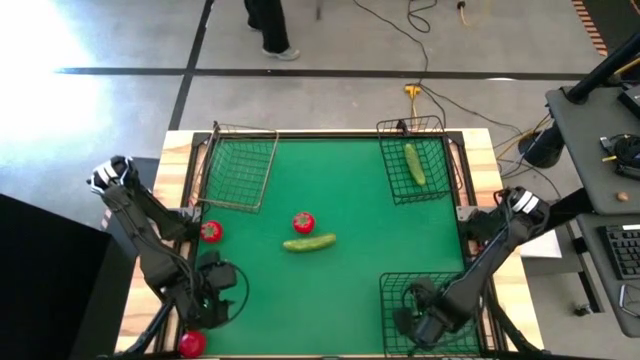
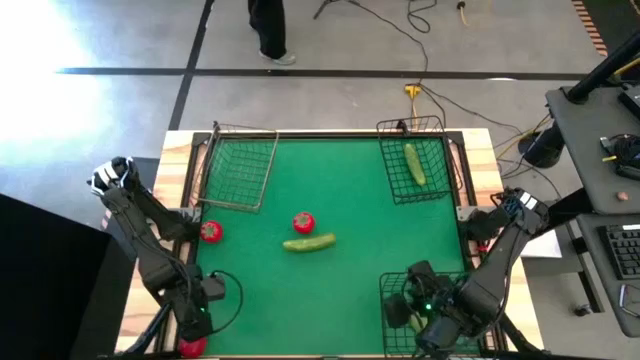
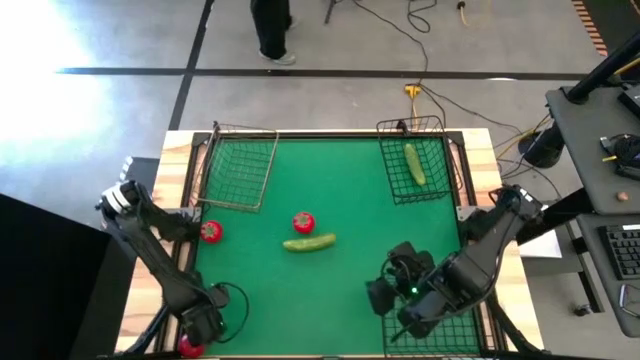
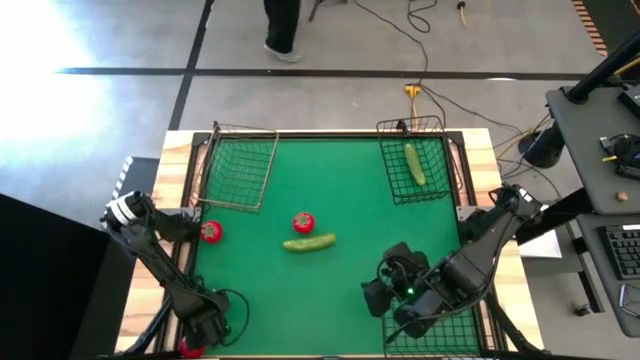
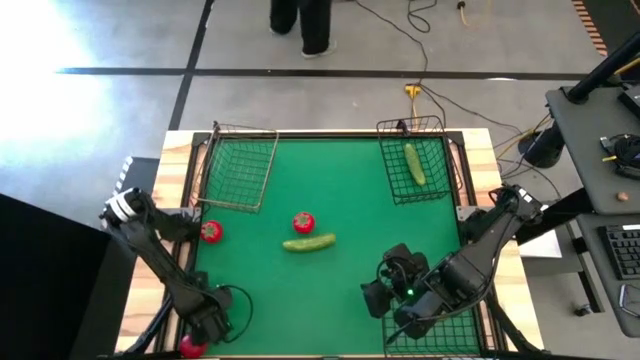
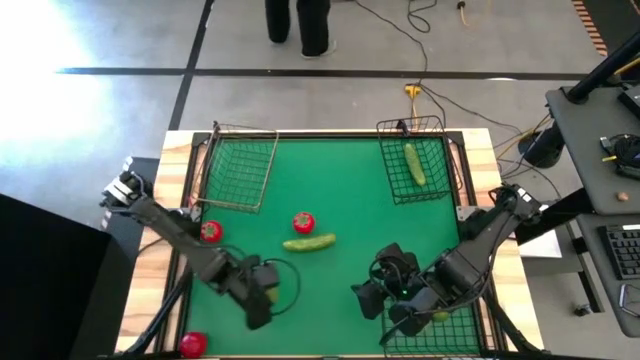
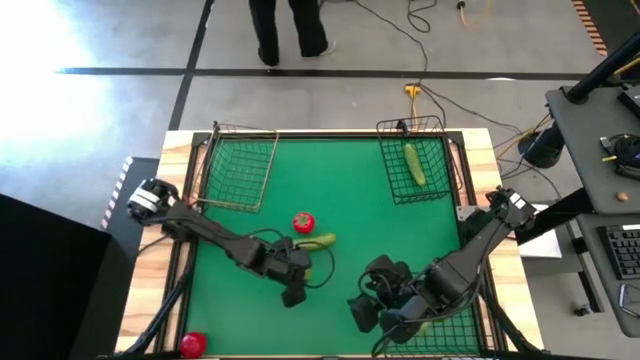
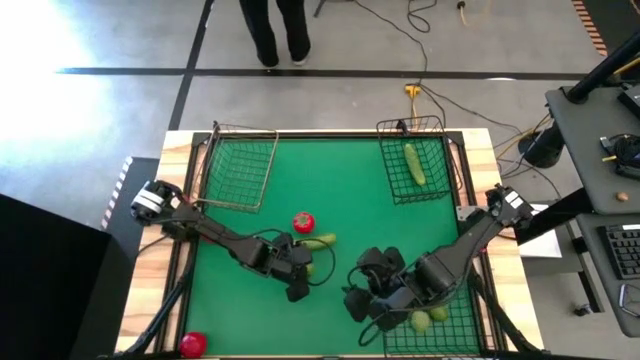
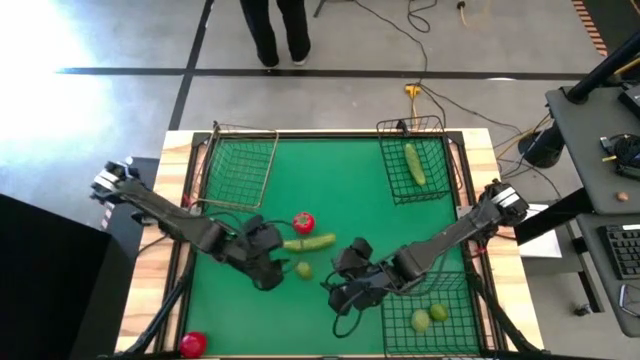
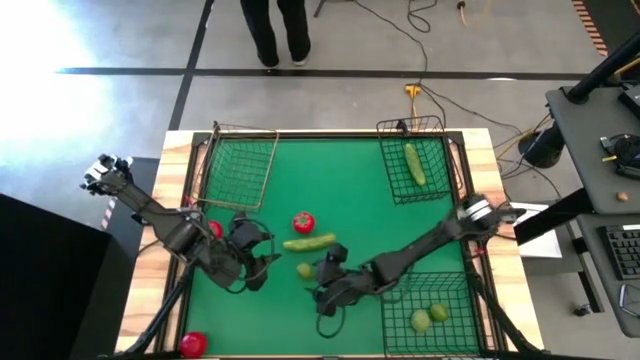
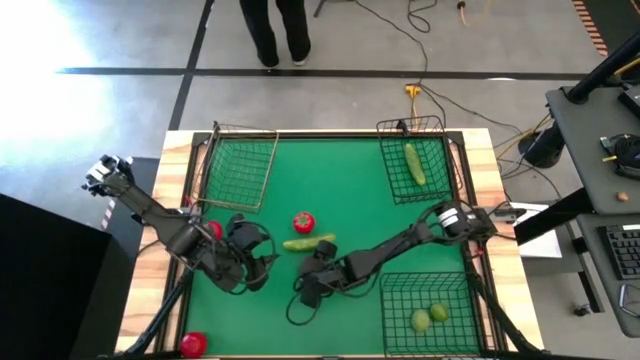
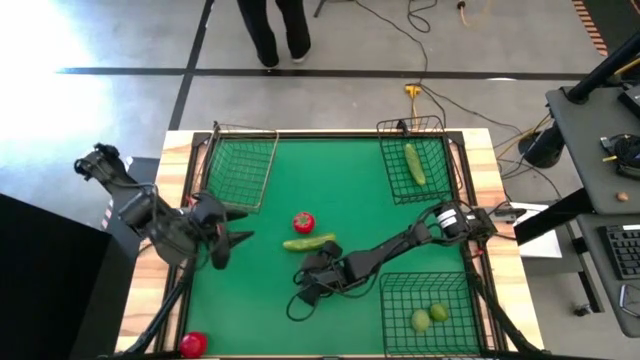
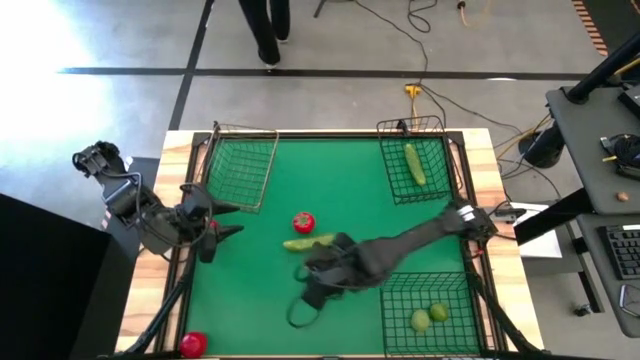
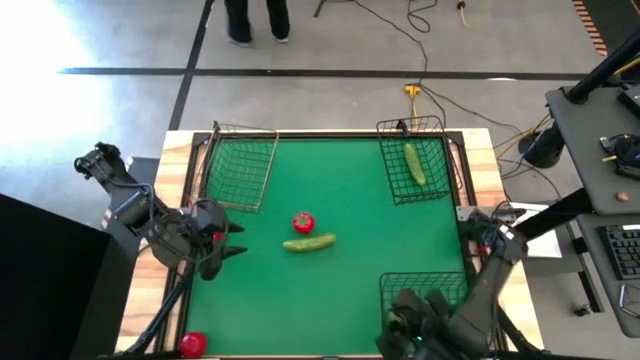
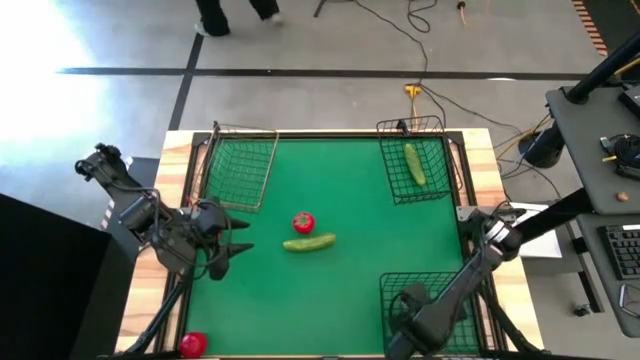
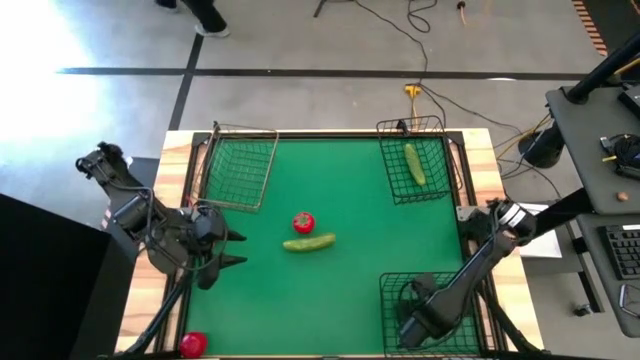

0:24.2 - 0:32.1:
Task: Sort produce into baskets
Put the lime into the bottom right wire basket

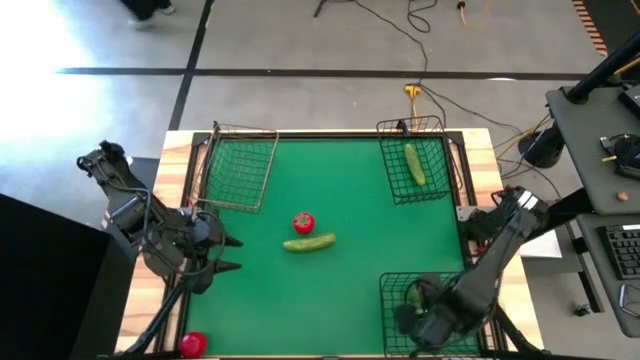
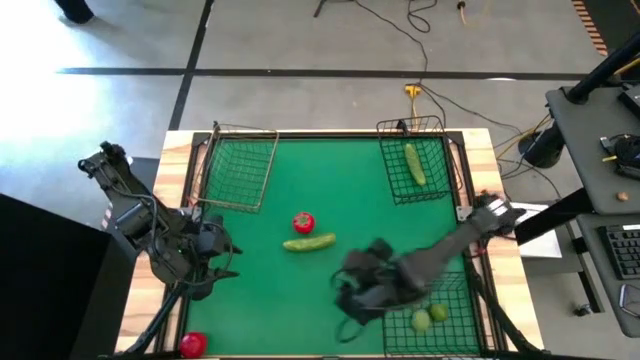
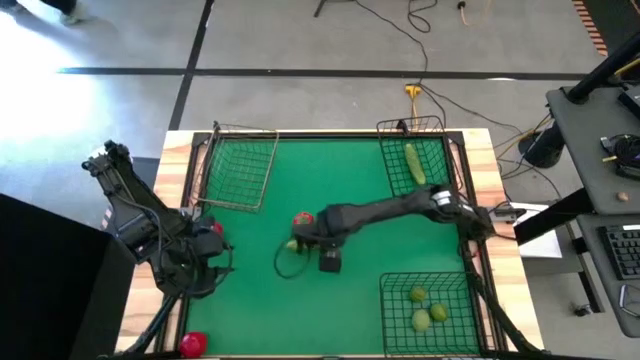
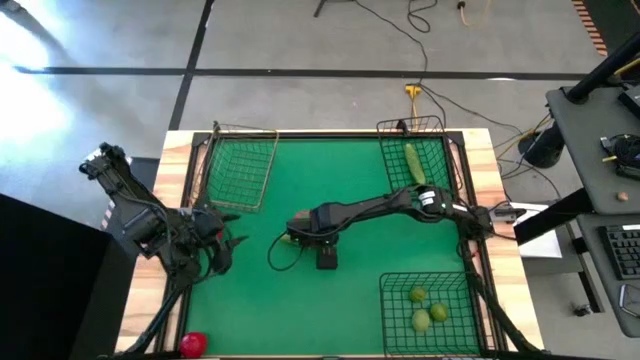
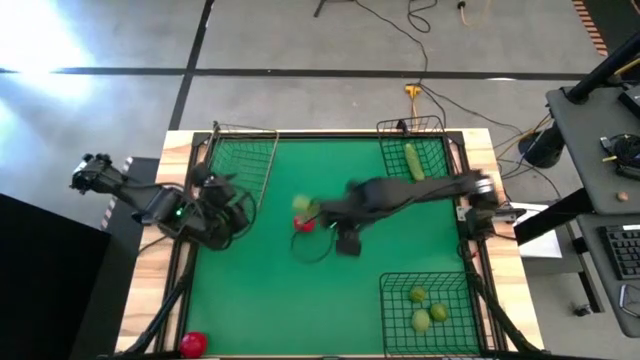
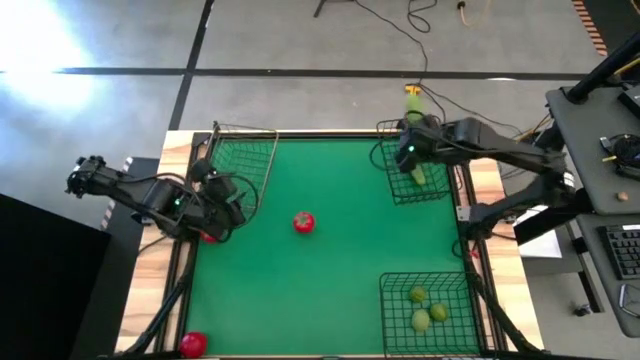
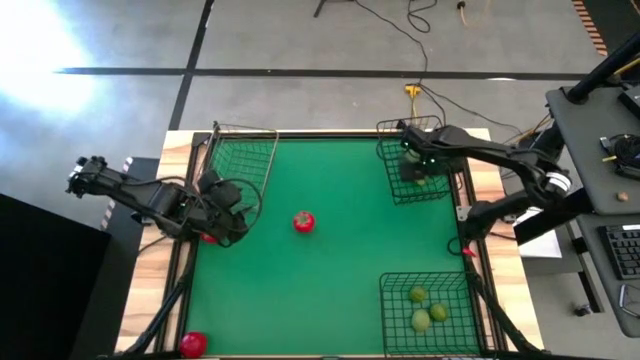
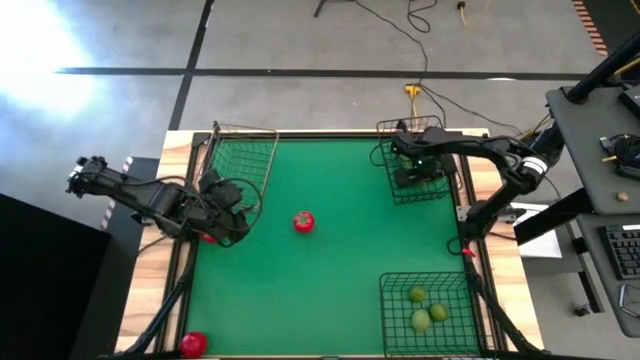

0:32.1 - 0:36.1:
Put the cucumber into the top right wire basket

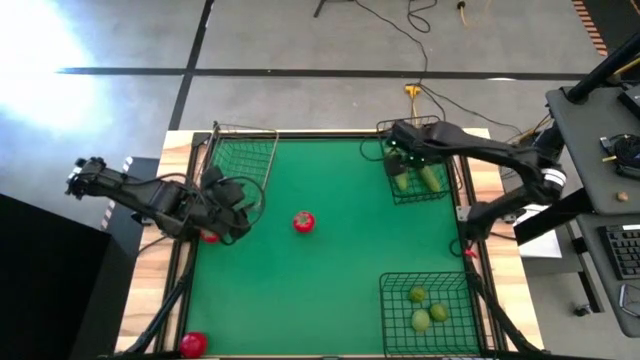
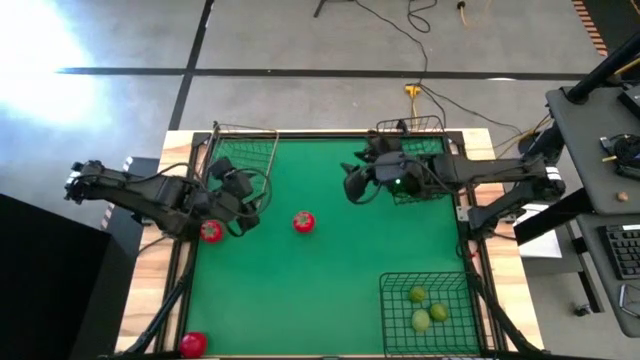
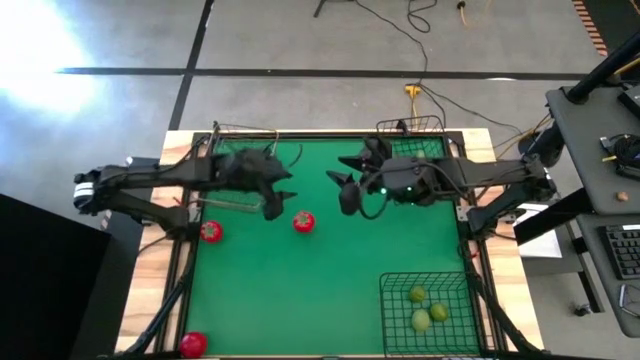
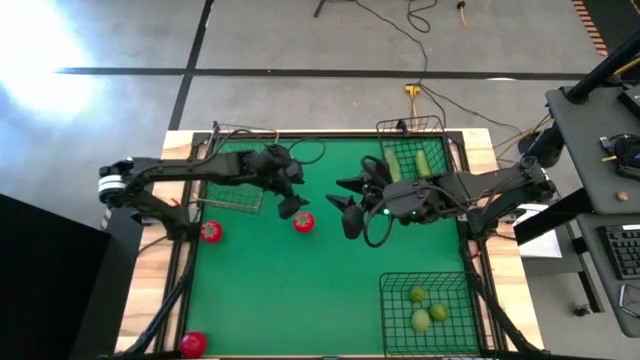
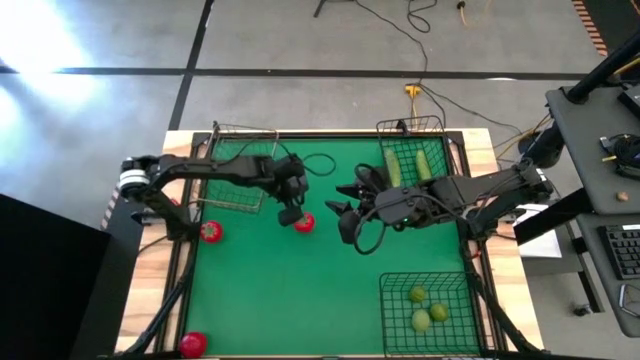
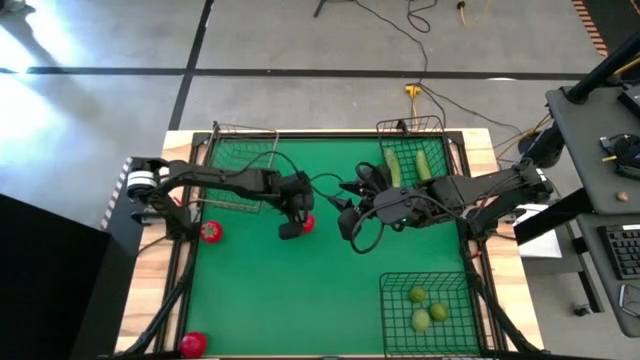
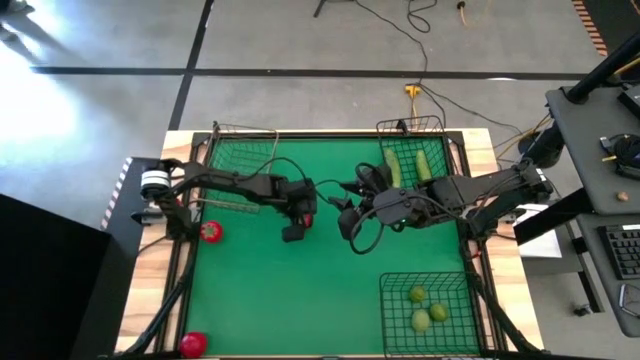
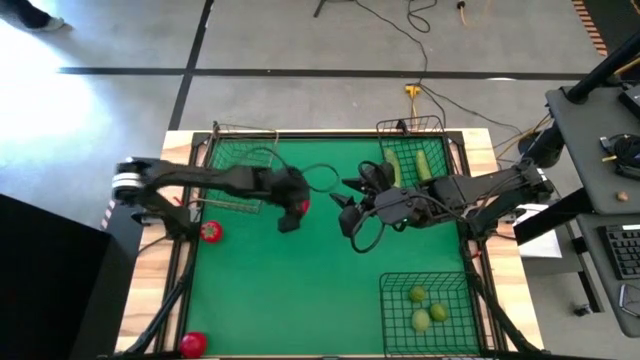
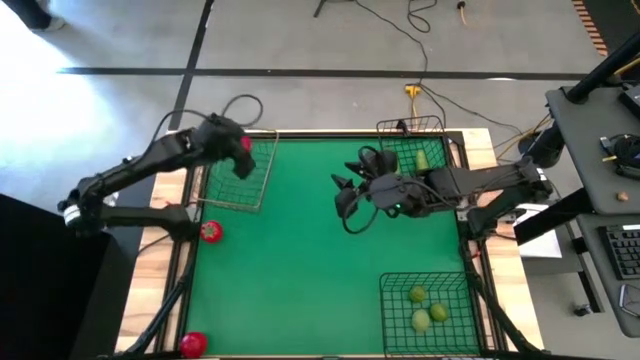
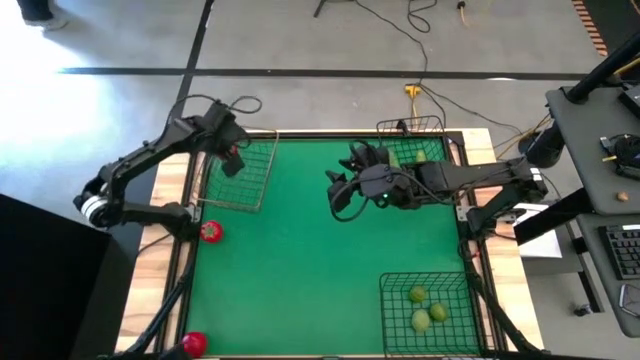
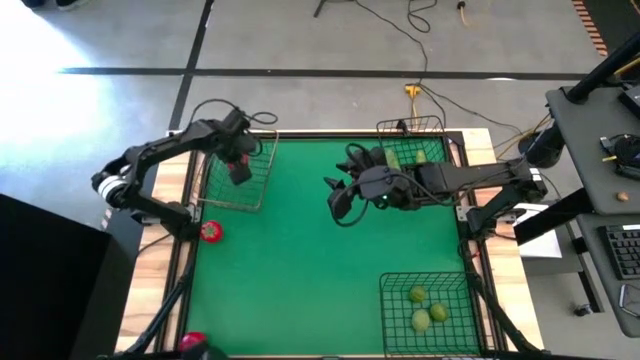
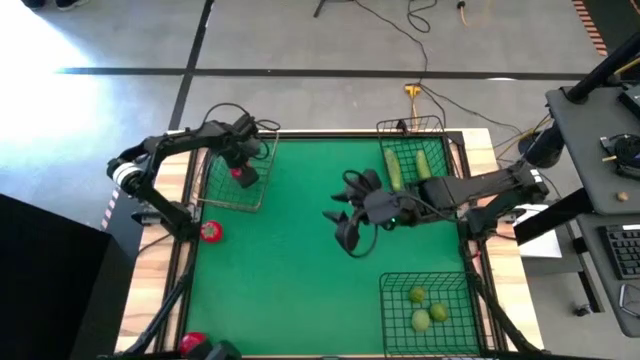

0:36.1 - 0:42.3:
Put the top right tomato into the top left wire basket

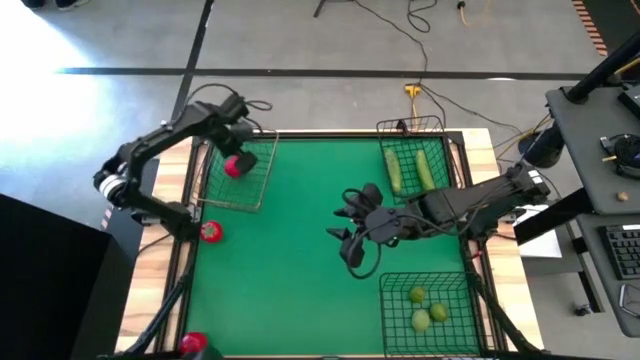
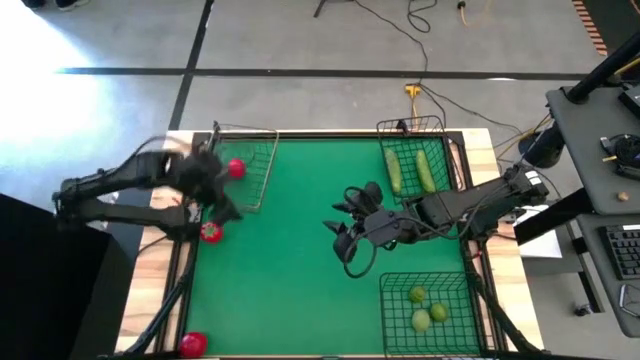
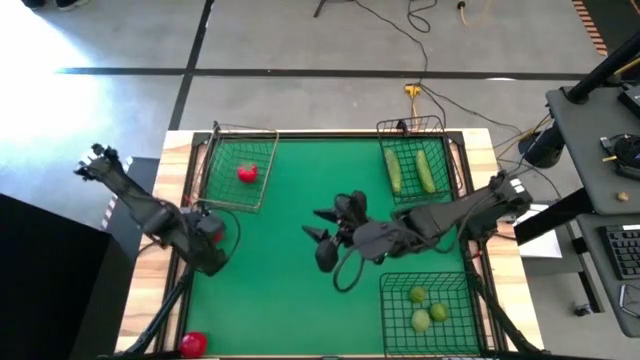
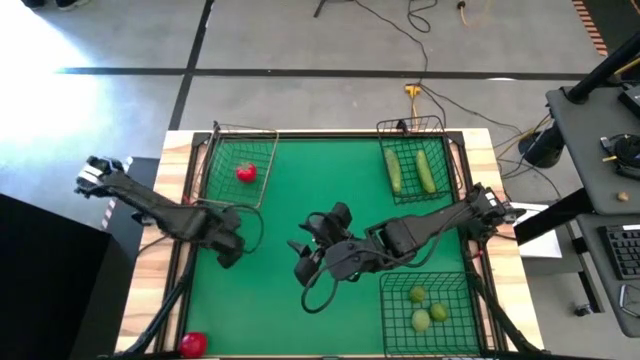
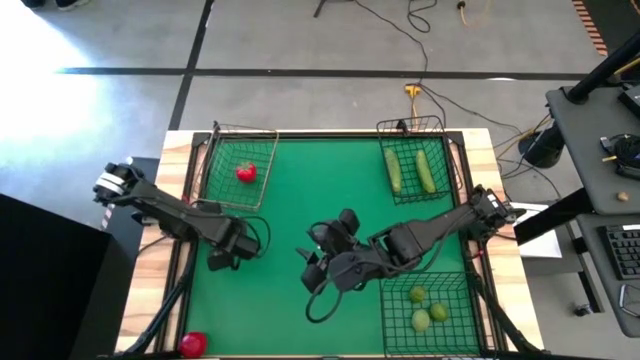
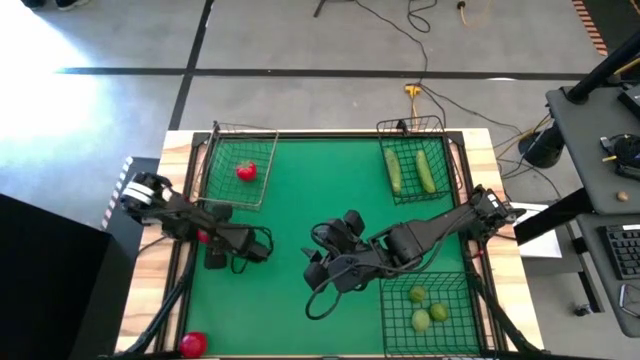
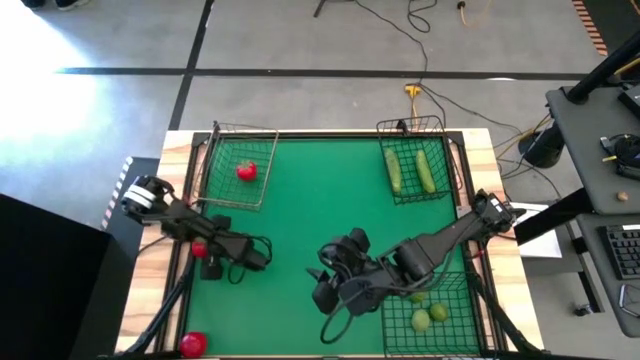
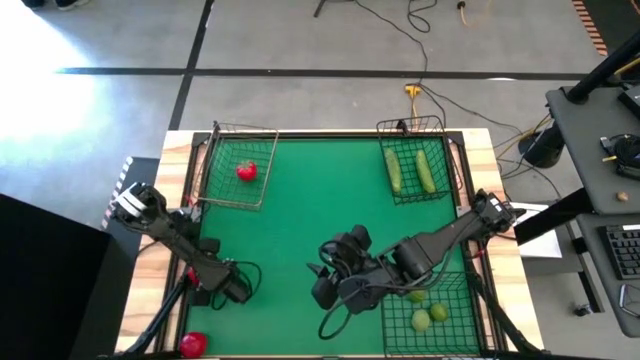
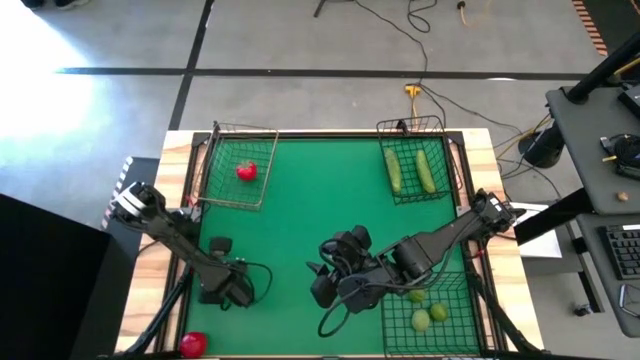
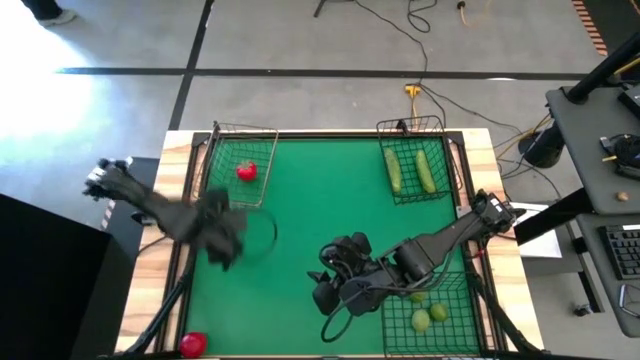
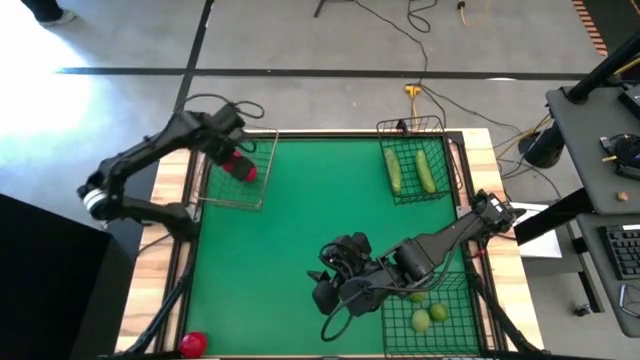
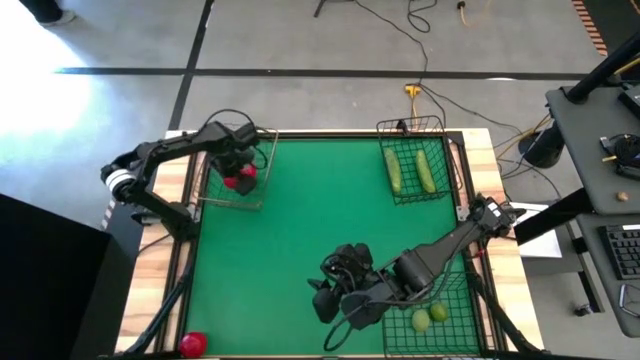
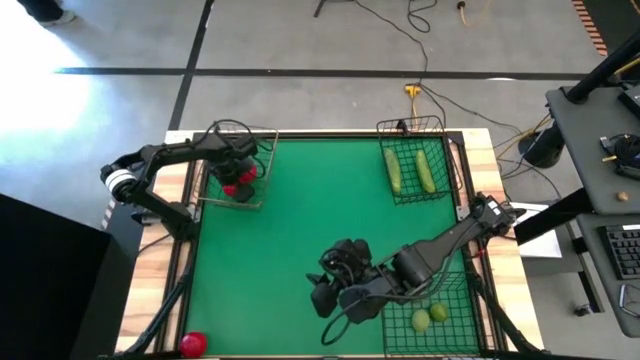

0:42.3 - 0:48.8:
Put the top tomato into the top left wire basket
